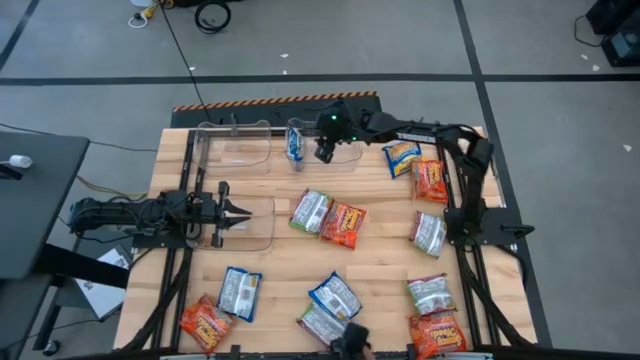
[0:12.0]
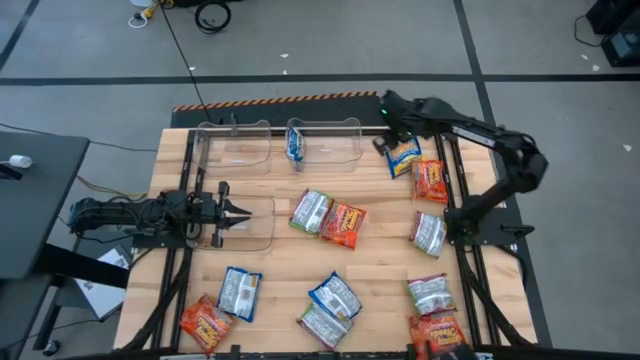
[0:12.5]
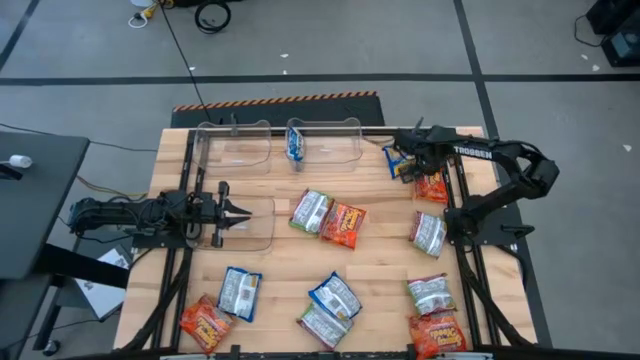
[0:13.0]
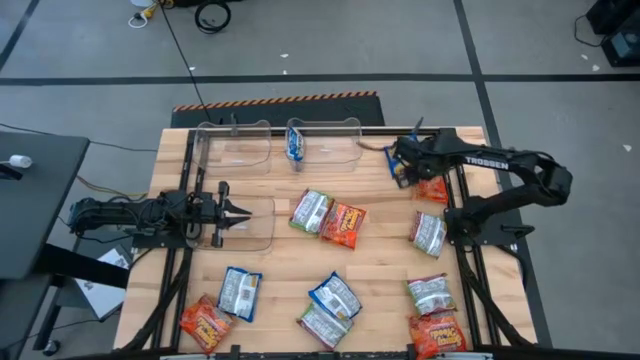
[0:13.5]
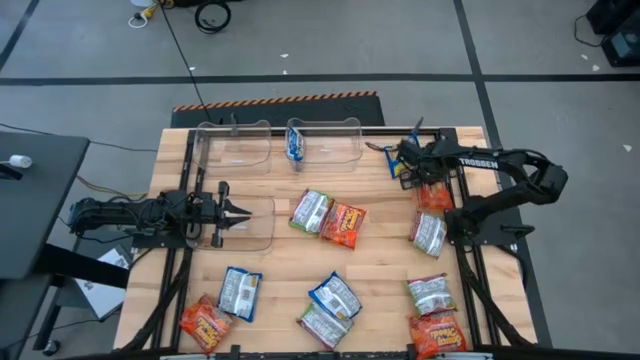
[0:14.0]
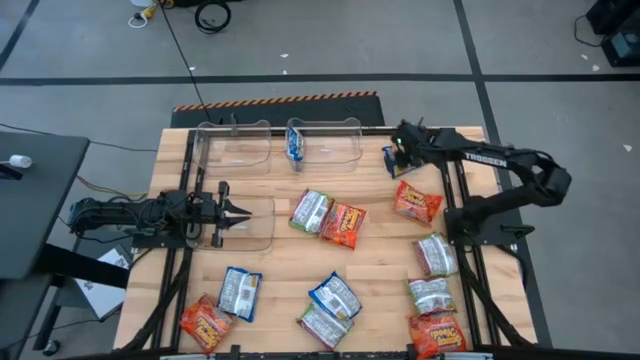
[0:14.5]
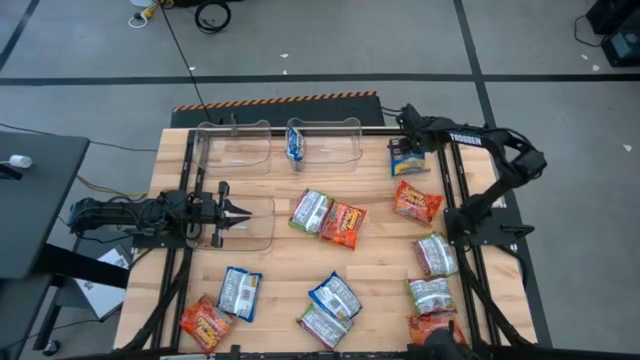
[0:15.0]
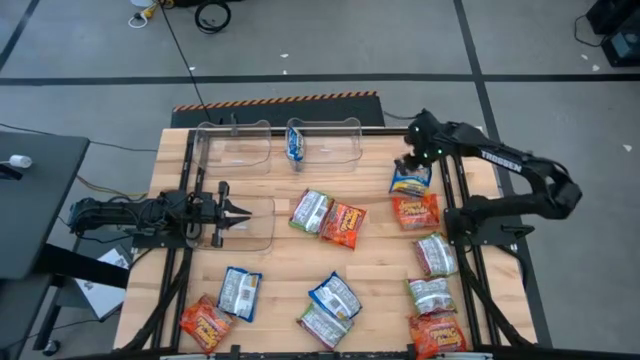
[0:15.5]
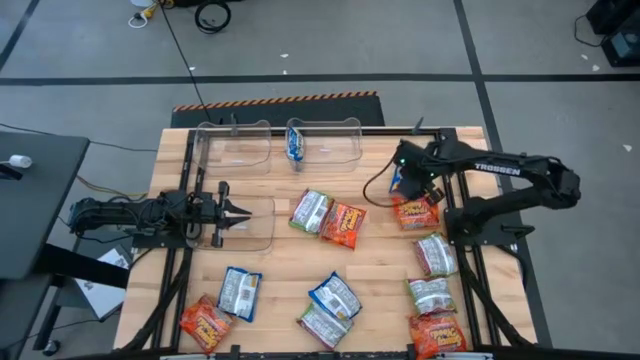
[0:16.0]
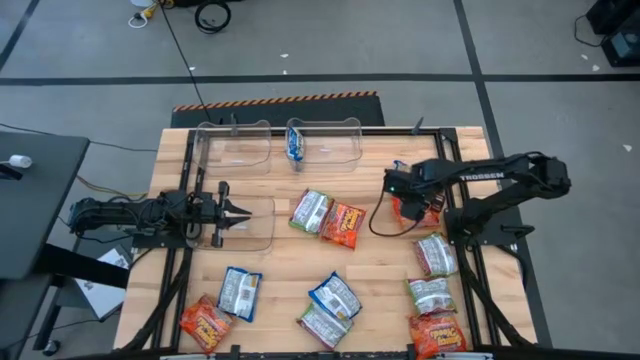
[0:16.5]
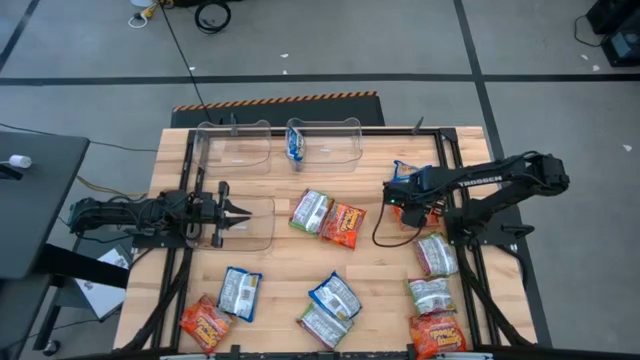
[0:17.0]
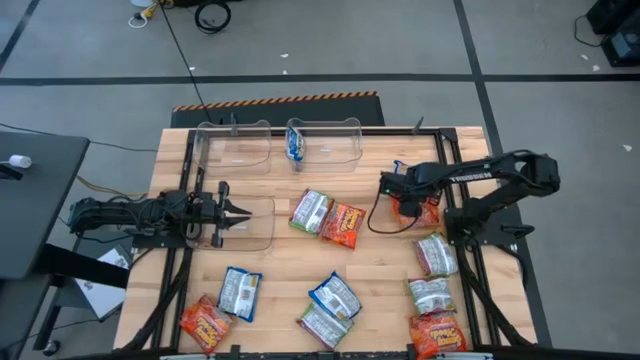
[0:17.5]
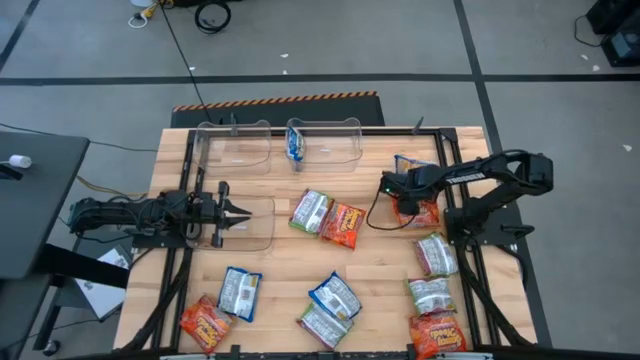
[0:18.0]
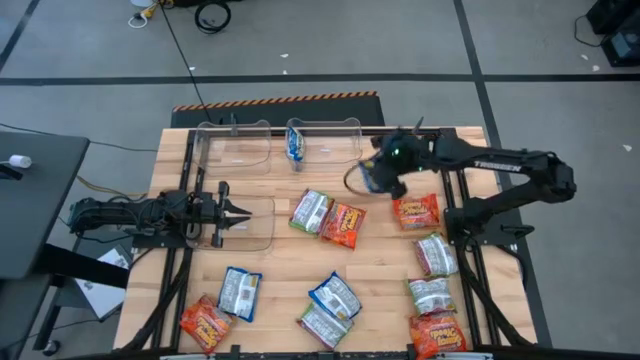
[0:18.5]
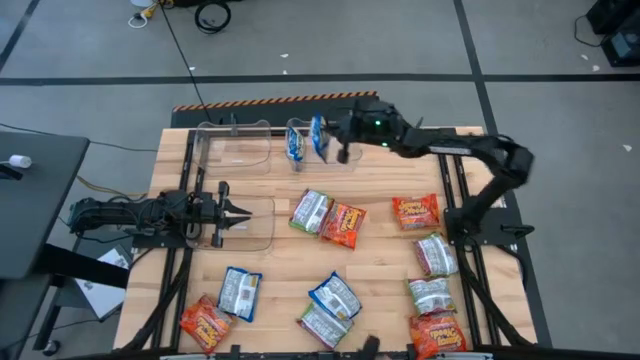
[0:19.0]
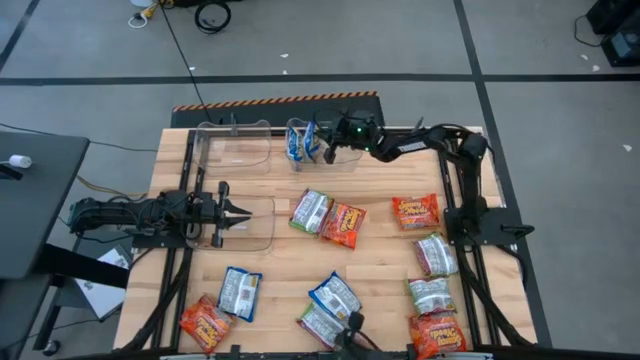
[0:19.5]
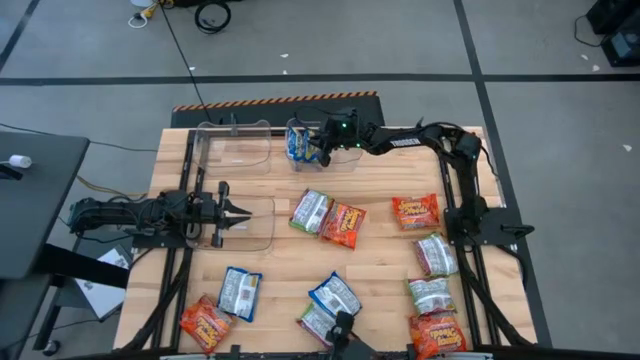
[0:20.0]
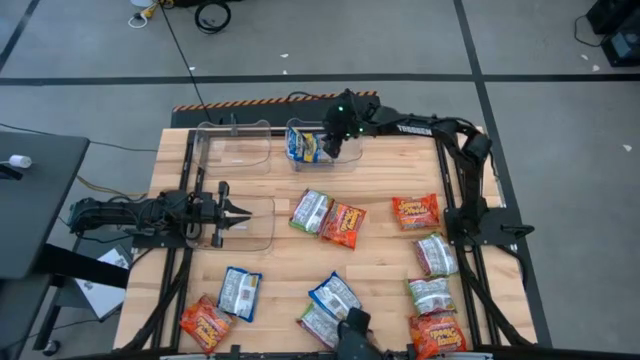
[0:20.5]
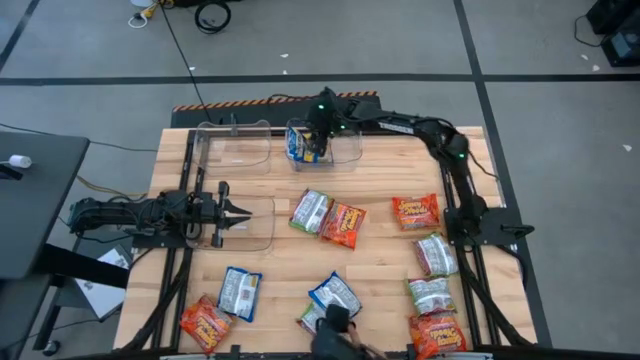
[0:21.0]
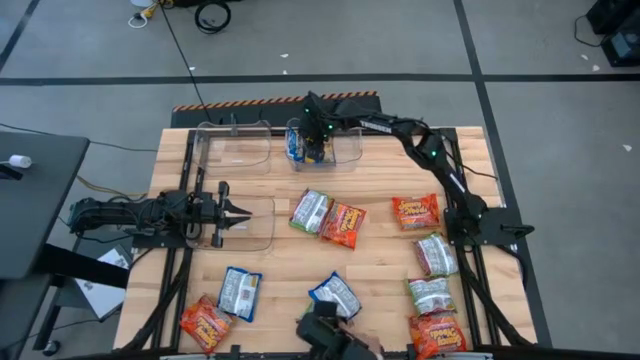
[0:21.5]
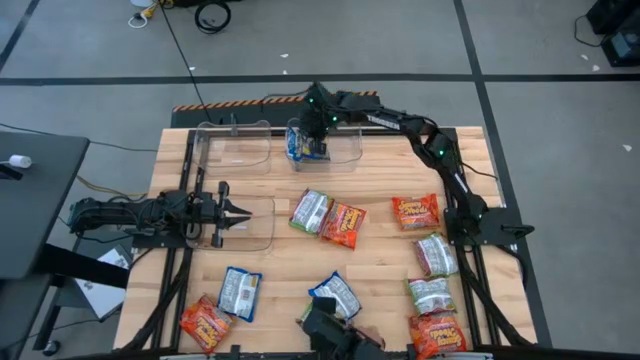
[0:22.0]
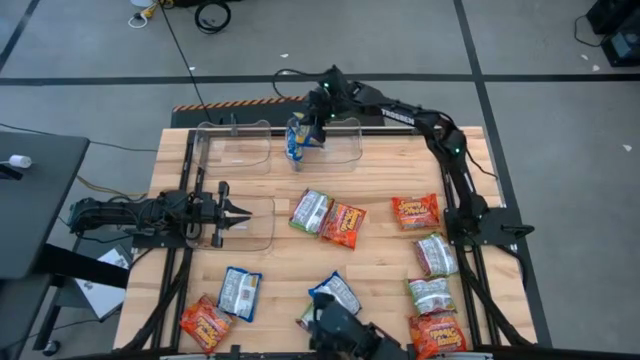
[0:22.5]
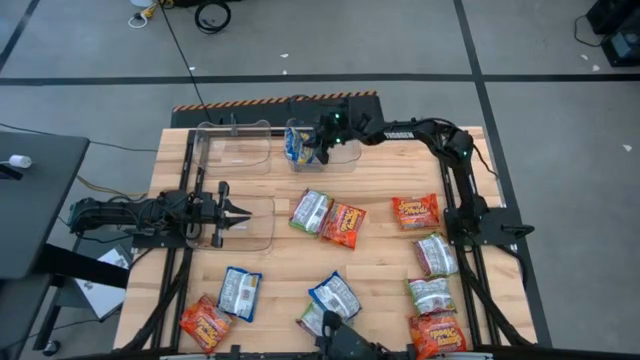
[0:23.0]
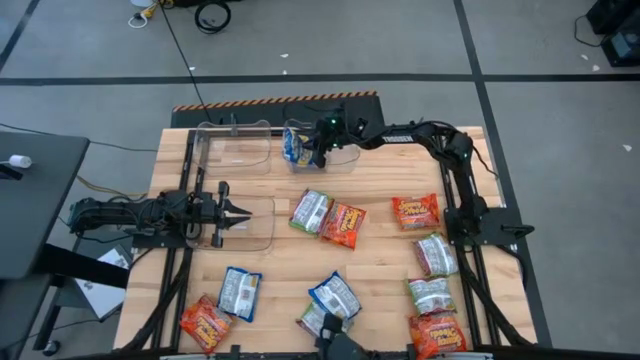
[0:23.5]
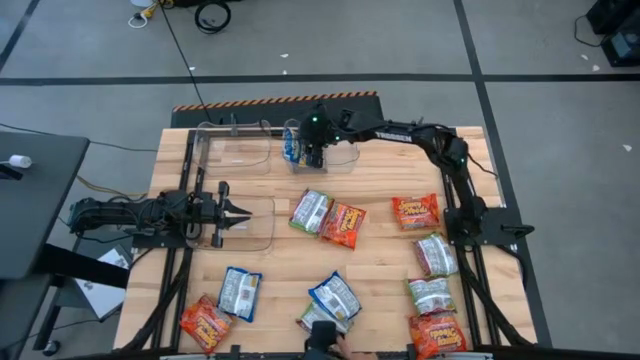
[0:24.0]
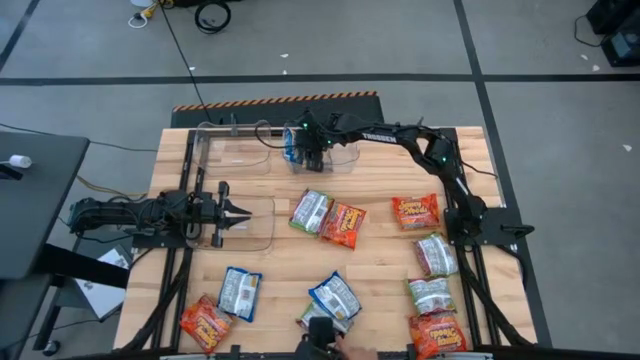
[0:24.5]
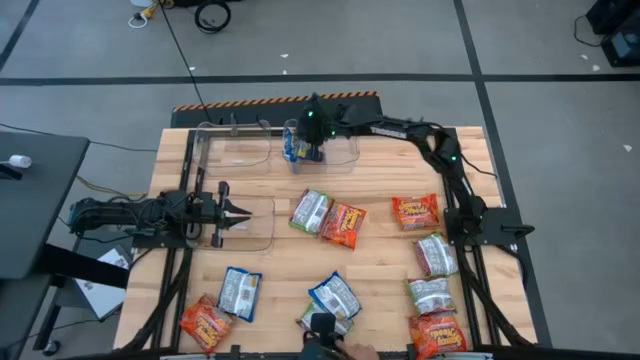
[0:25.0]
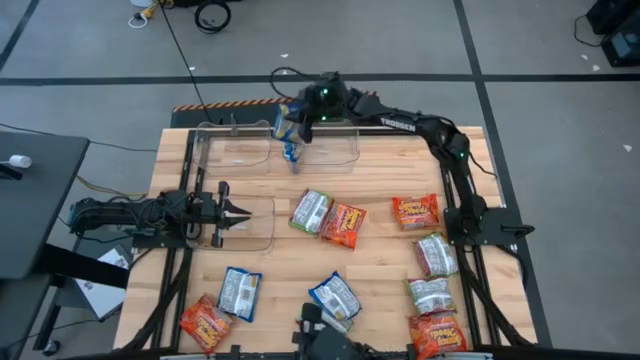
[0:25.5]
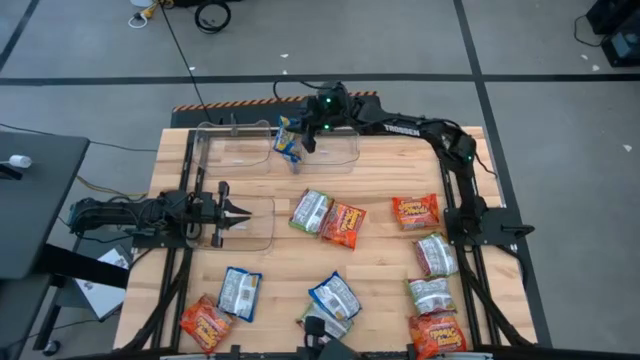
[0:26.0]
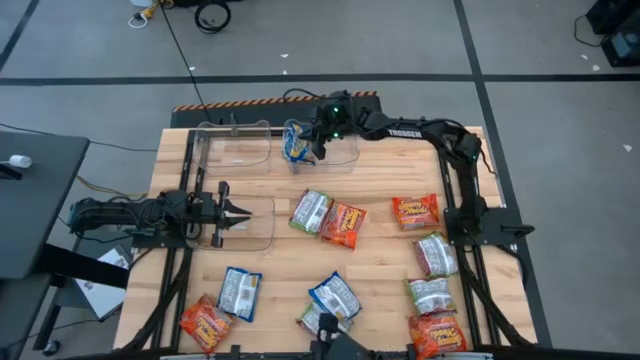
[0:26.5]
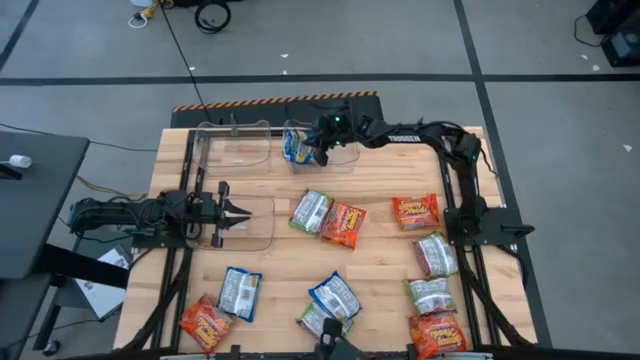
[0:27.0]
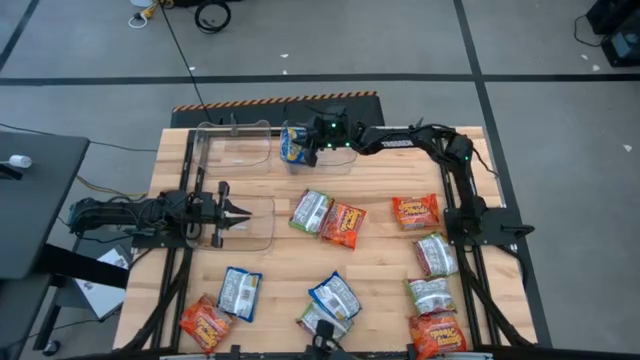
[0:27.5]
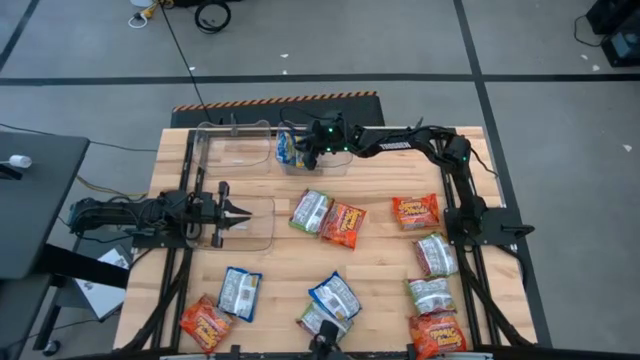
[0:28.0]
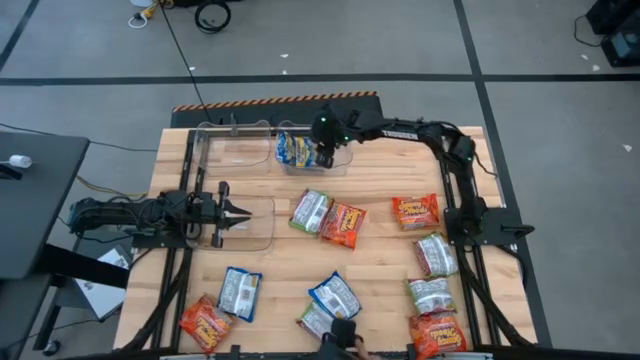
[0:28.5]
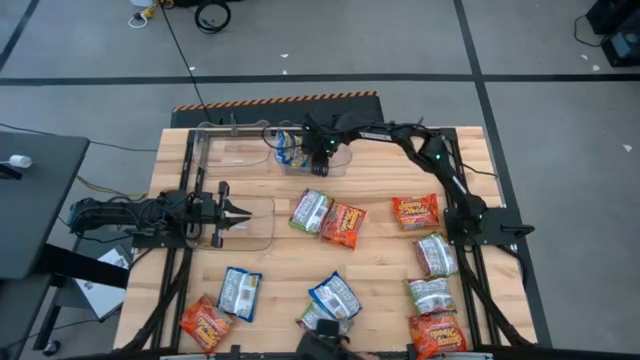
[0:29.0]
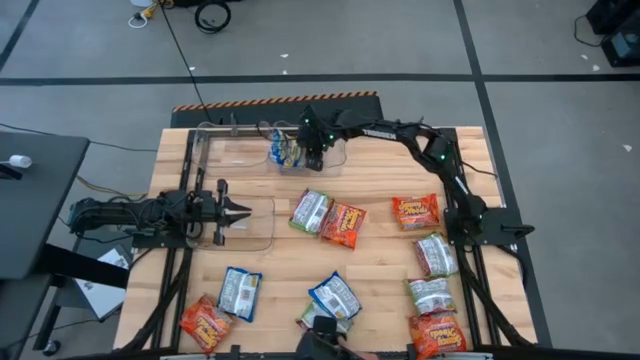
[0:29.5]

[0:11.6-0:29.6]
Task: Sort Maruchan noodles
Put the blue noodle pack into the right transparent bin

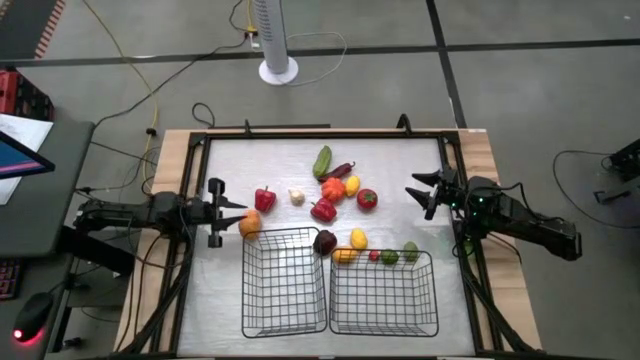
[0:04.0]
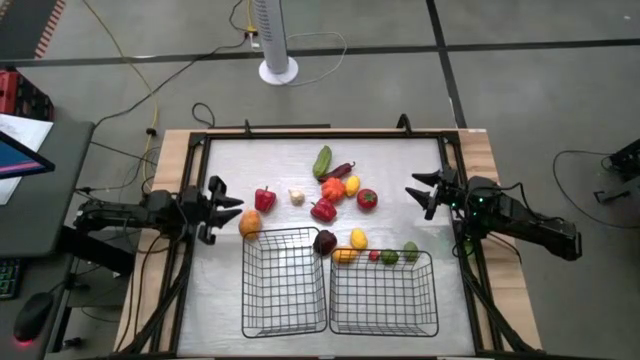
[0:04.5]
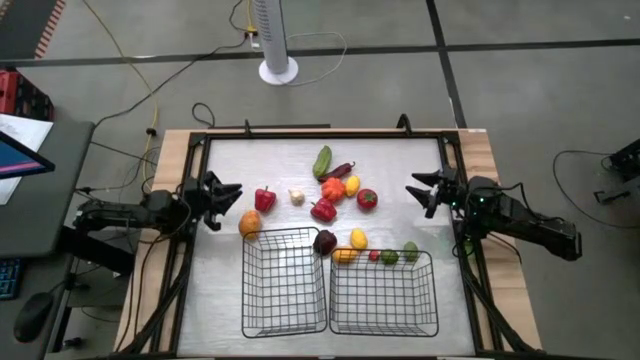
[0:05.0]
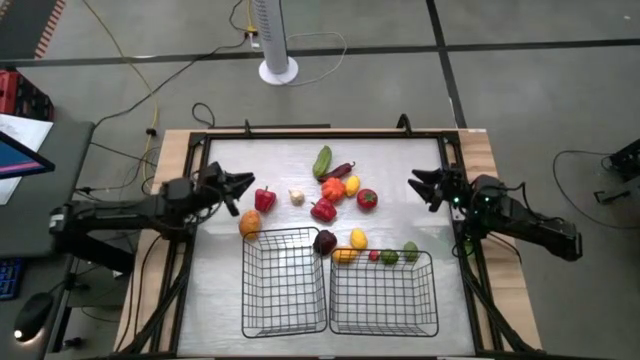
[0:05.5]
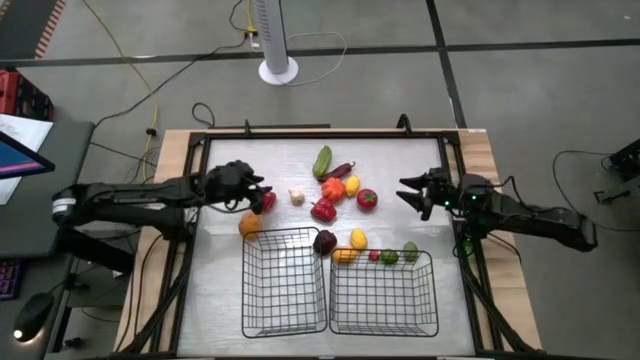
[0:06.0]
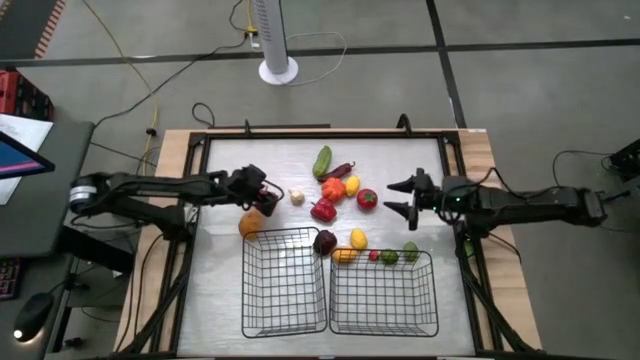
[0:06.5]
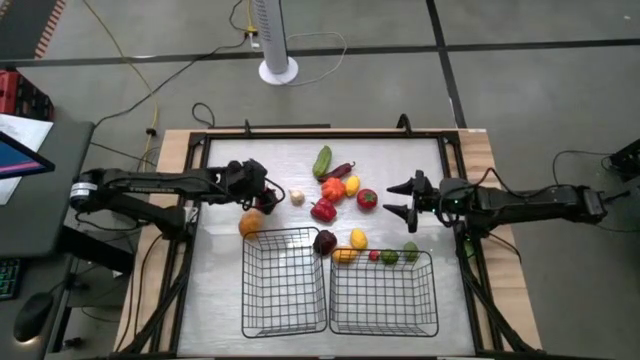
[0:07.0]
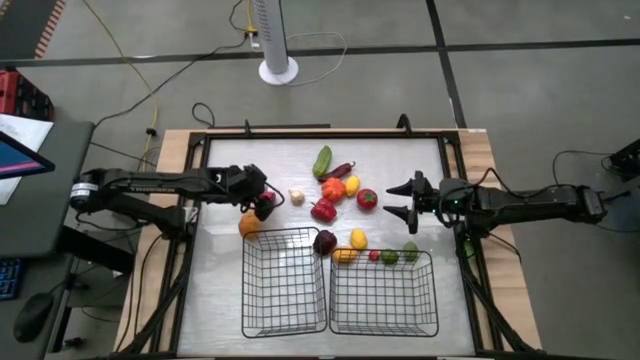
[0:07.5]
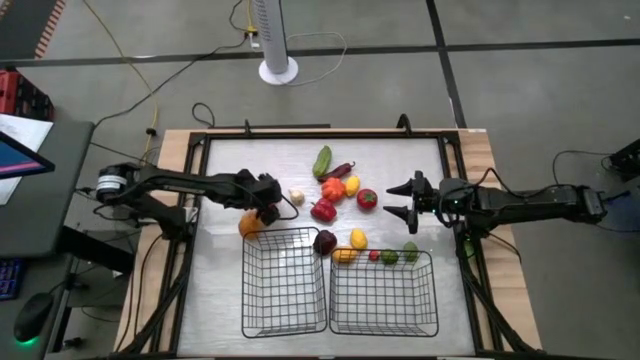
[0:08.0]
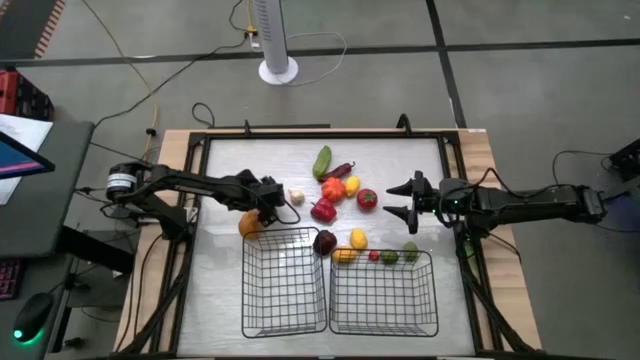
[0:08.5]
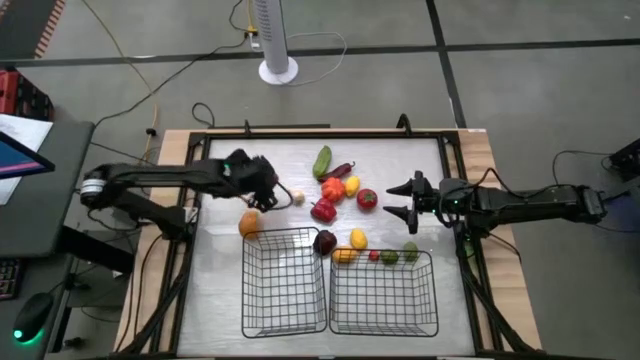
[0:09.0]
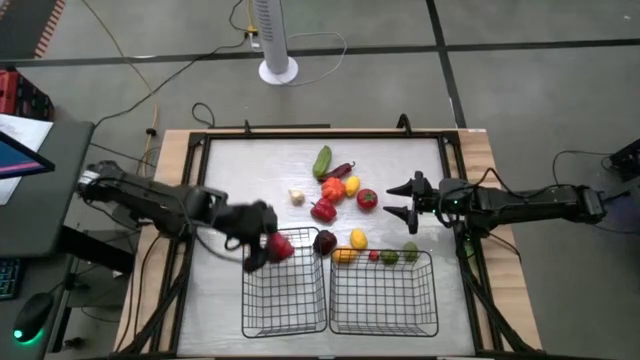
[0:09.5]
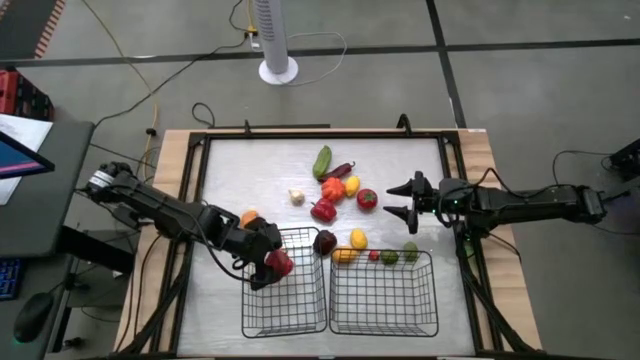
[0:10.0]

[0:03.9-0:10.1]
Task: Sort produce into baskets
Put the left red bell pepper into the left black wire basket
